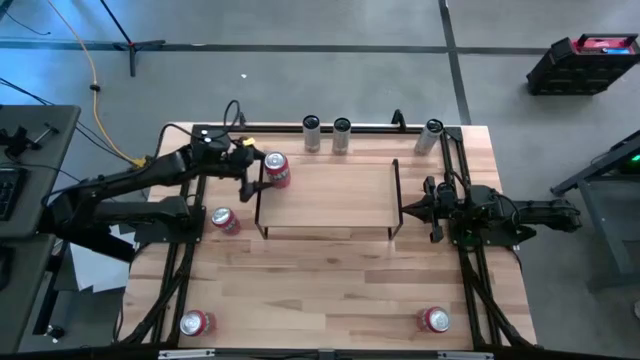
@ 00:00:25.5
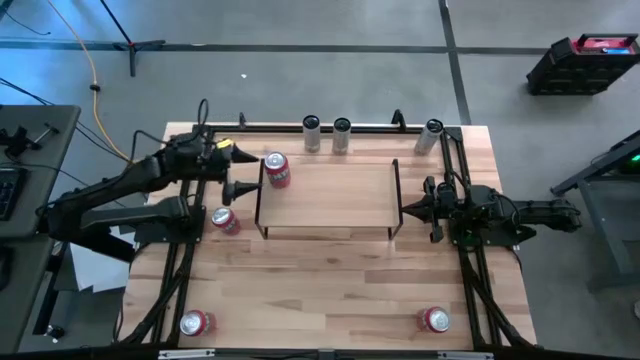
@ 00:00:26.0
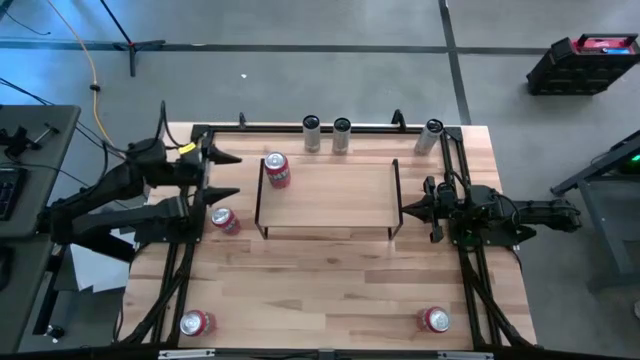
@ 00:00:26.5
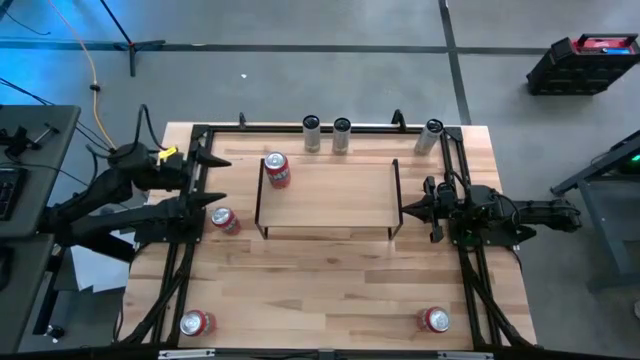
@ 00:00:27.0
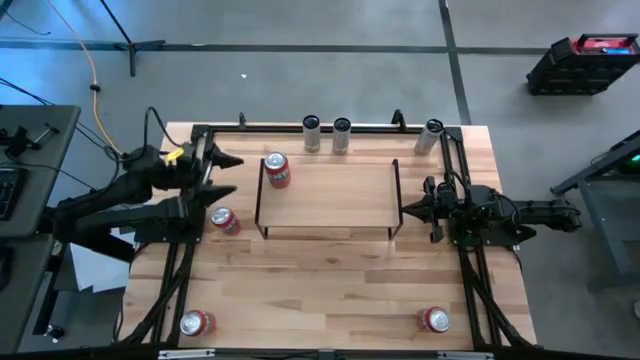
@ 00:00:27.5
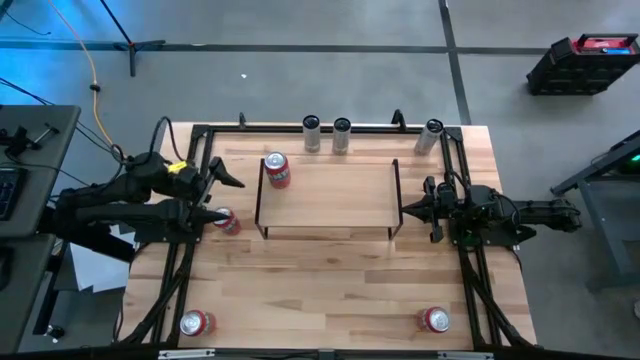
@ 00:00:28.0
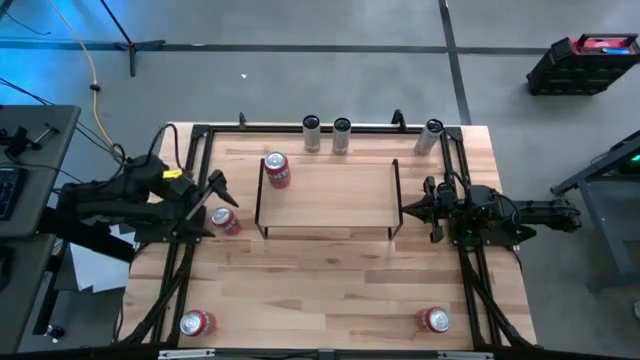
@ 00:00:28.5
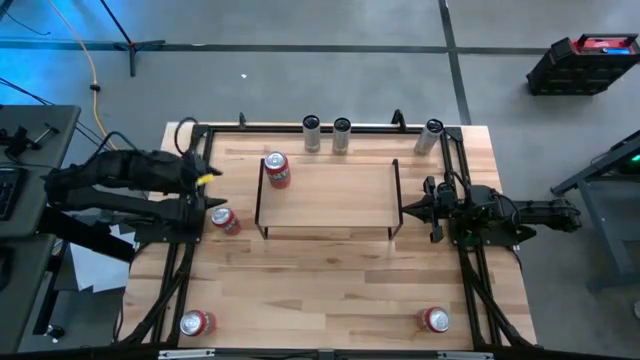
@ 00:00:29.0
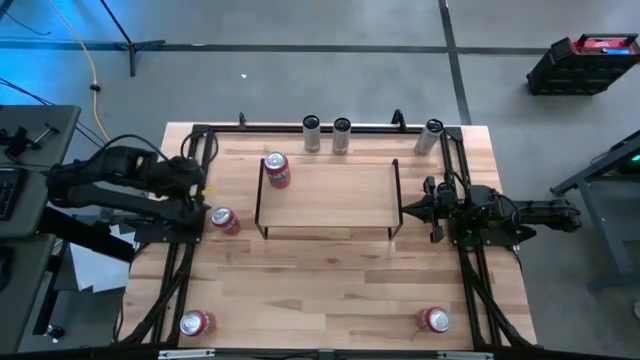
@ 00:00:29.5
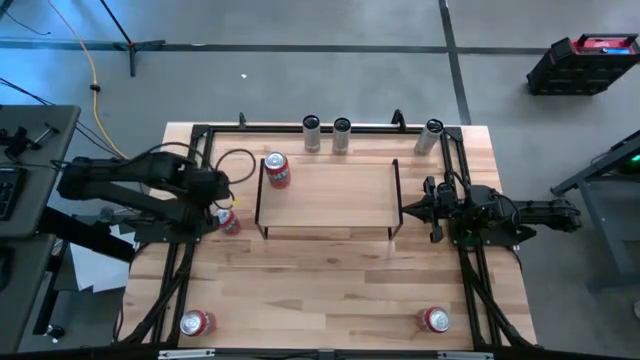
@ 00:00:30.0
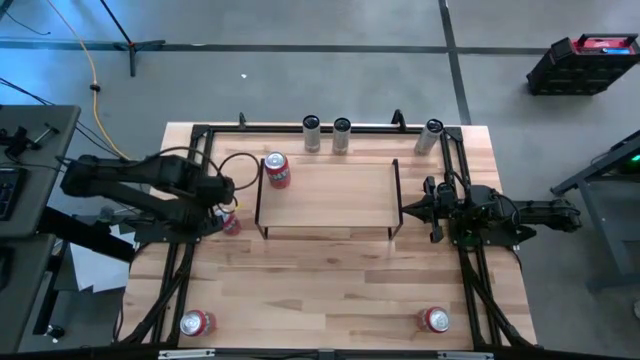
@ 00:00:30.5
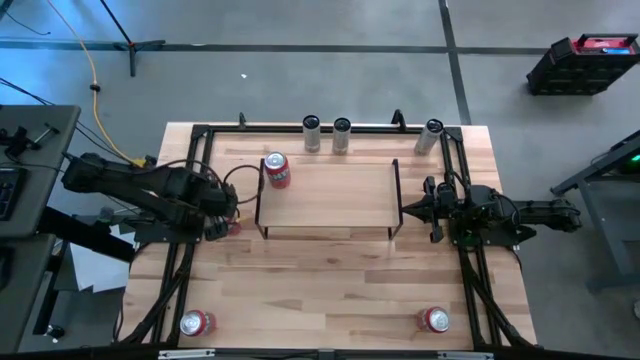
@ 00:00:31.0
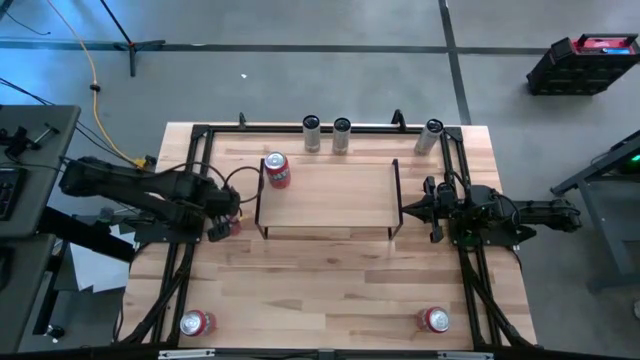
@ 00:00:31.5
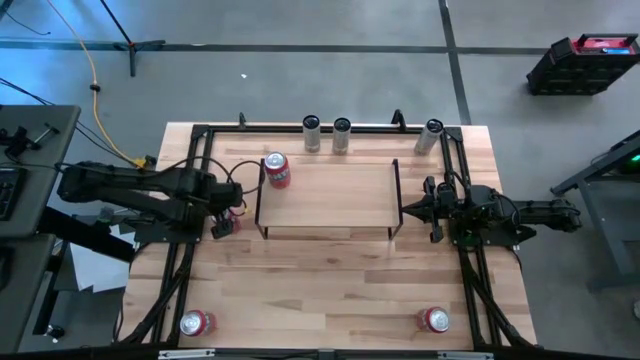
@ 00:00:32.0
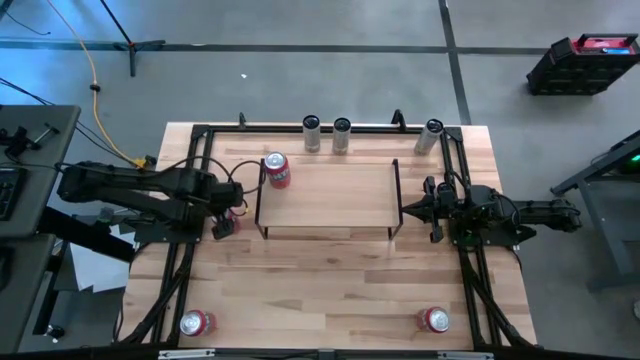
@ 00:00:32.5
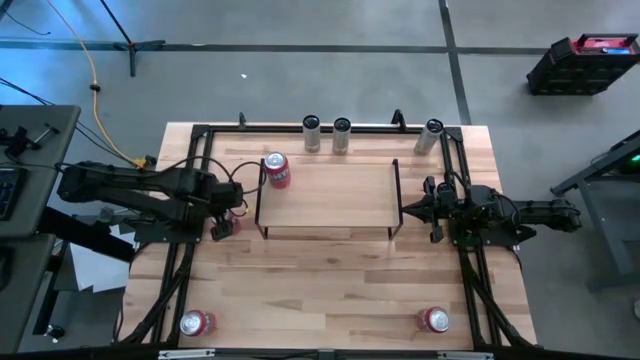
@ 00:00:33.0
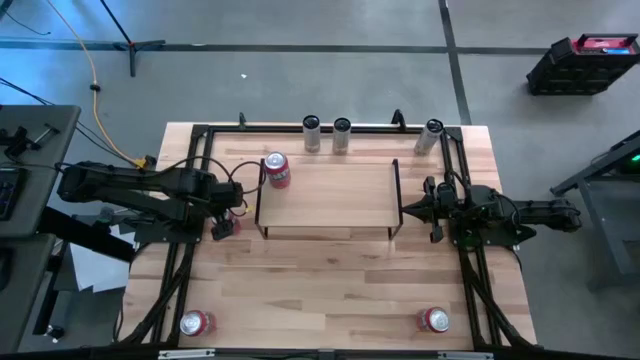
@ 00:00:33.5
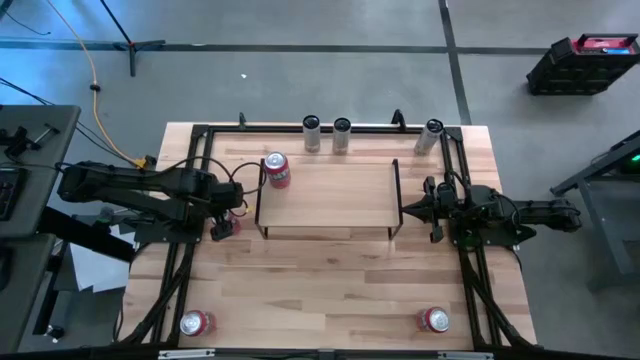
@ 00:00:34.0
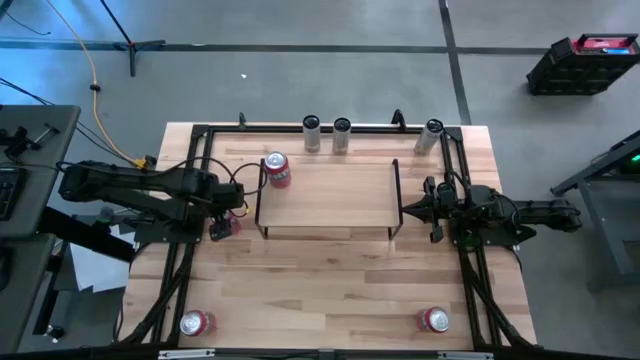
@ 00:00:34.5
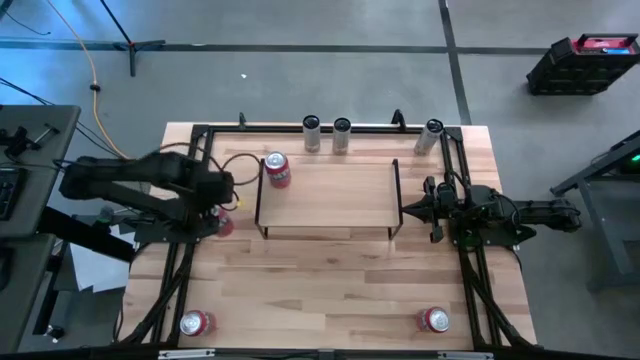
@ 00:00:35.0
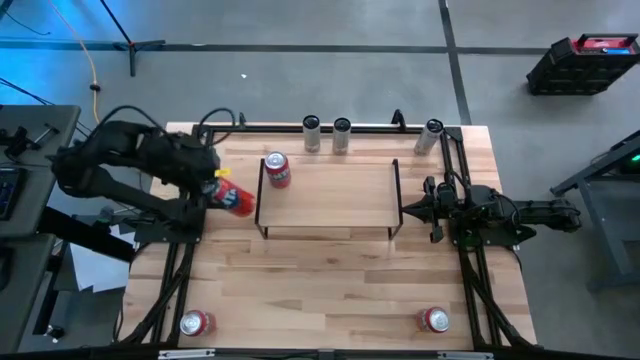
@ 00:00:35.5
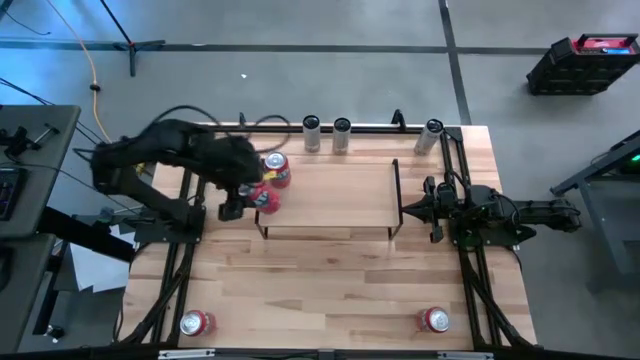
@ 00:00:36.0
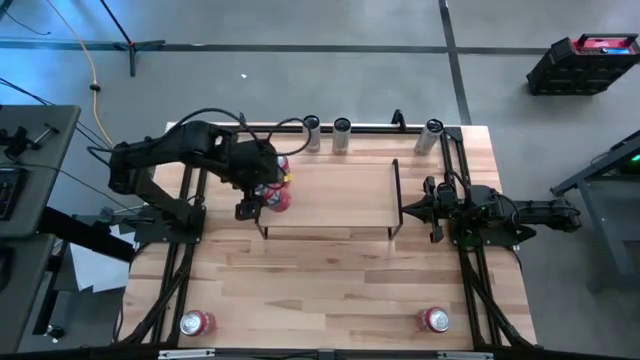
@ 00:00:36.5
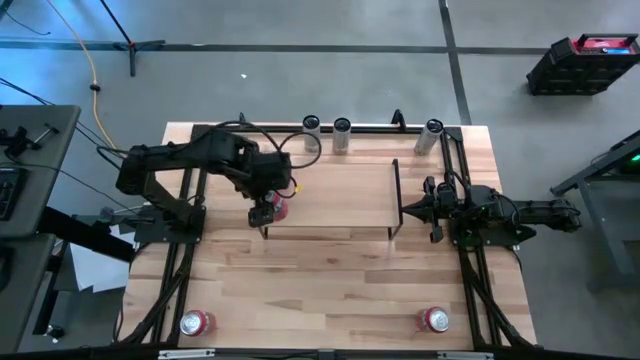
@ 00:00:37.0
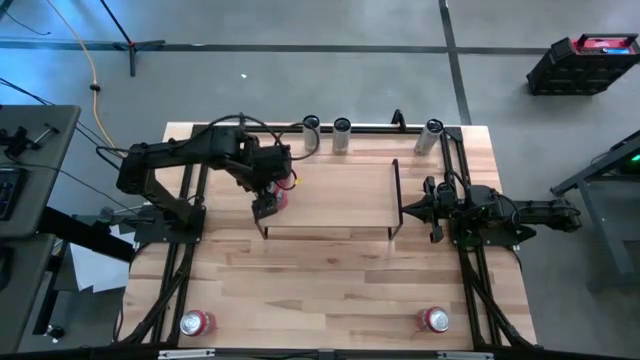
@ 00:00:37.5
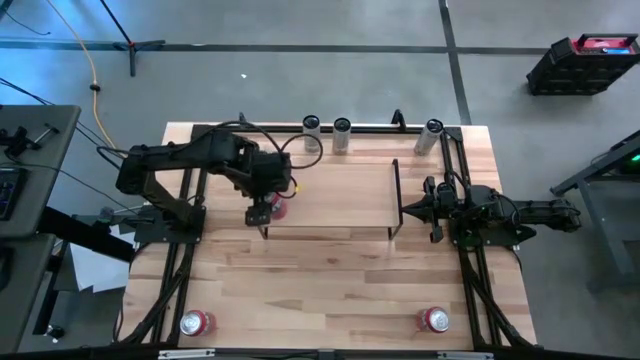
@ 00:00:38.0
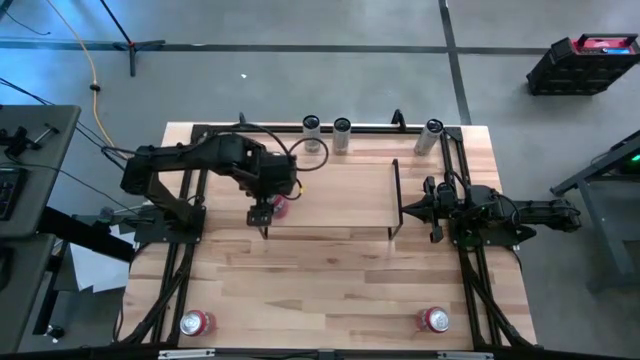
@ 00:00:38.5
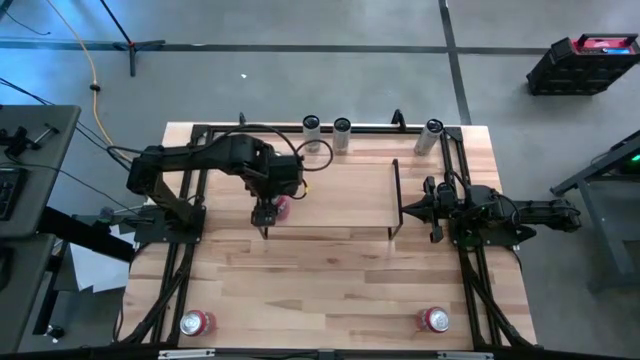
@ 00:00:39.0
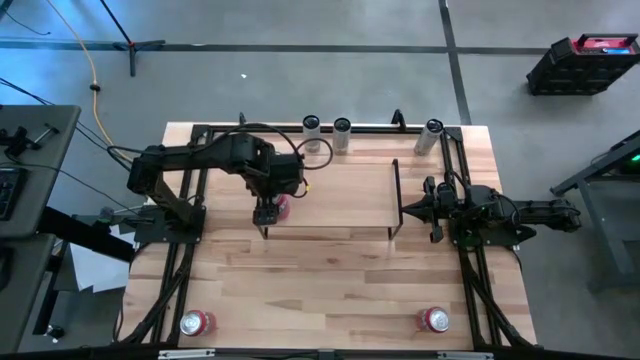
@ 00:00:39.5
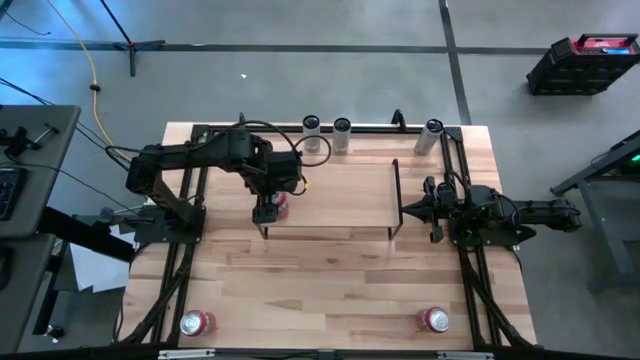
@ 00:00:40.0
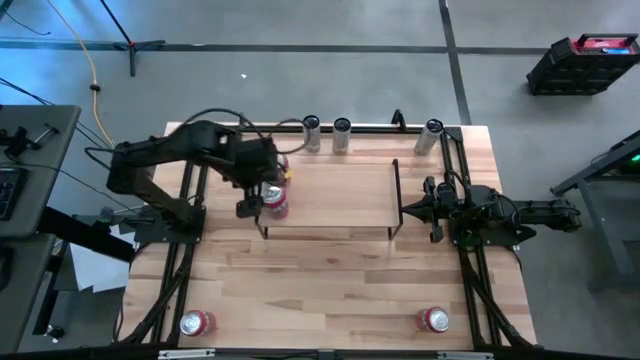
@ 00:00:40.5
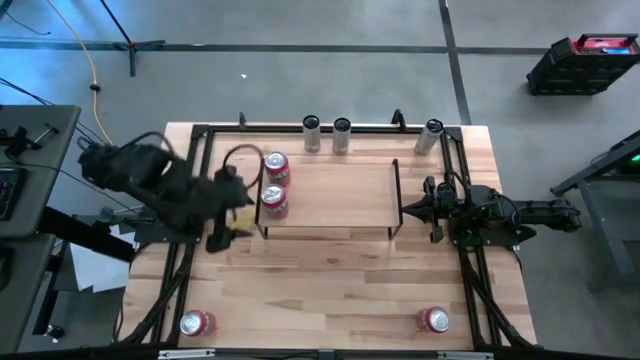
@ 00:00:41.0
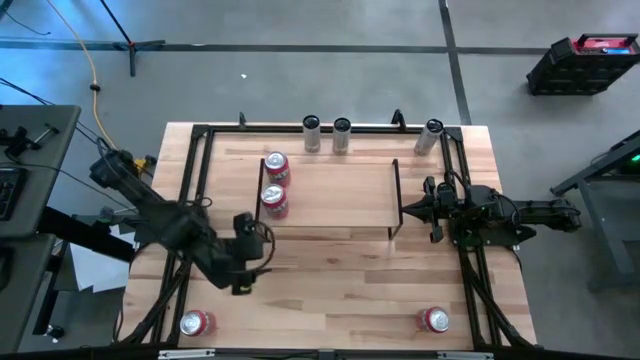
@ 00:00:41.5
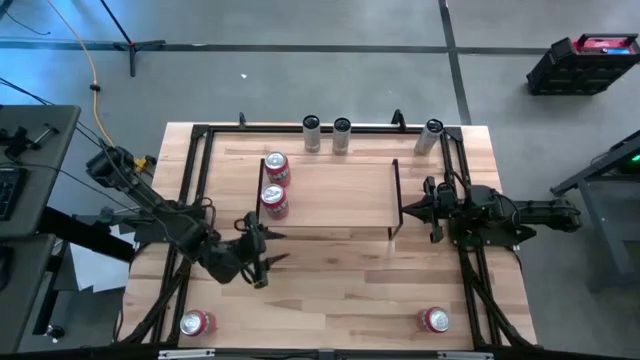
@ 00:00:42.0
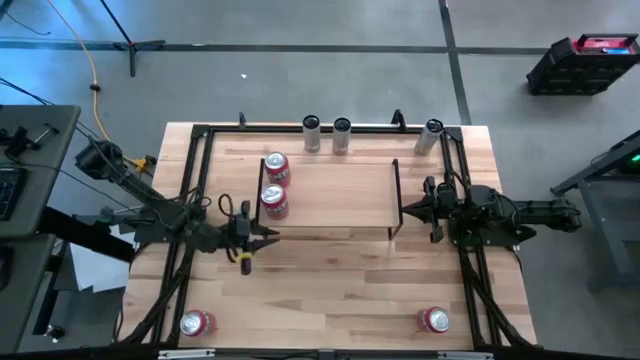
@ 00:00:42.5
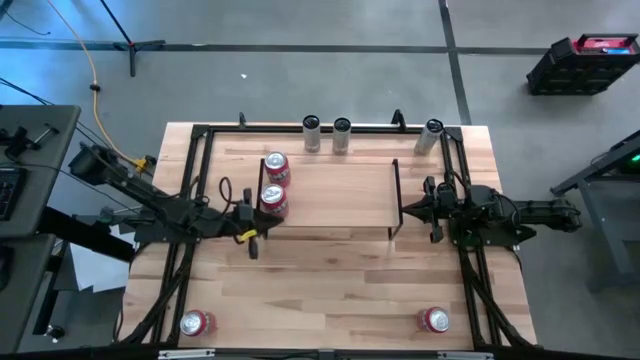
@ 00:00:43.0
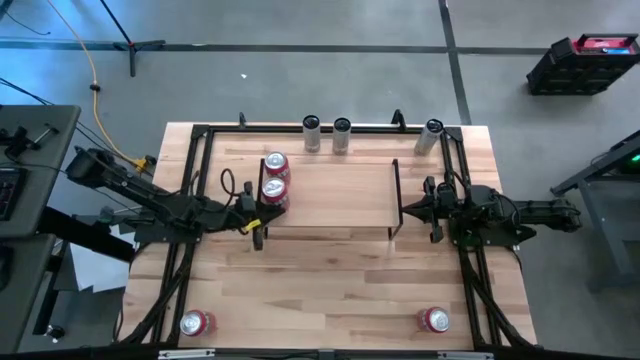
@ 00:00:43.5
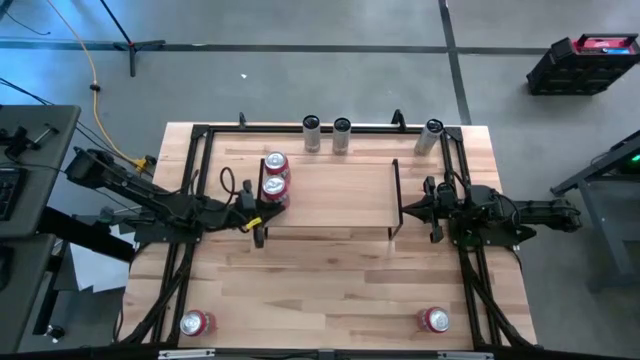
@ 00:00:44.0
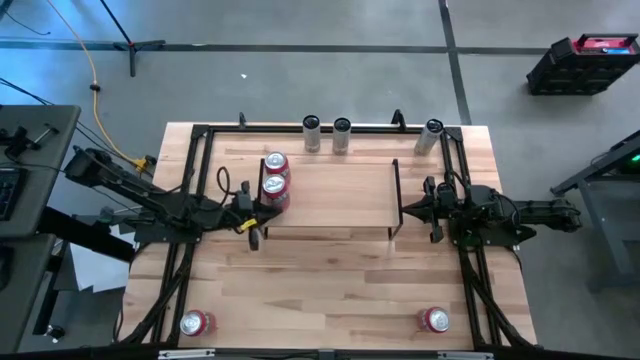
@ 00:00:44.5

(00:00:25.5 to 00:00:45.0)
Task: Place canned beverage on shelf
Put the red soda can on the shelf aligned with the other red soda can

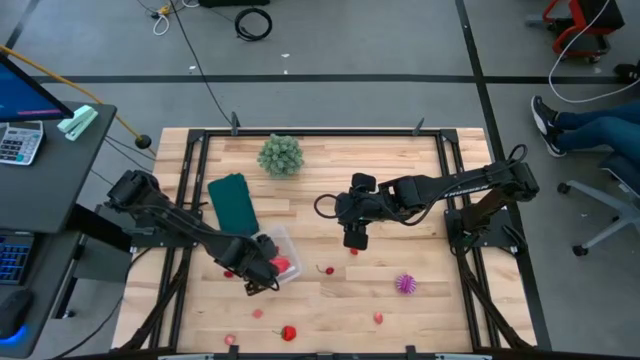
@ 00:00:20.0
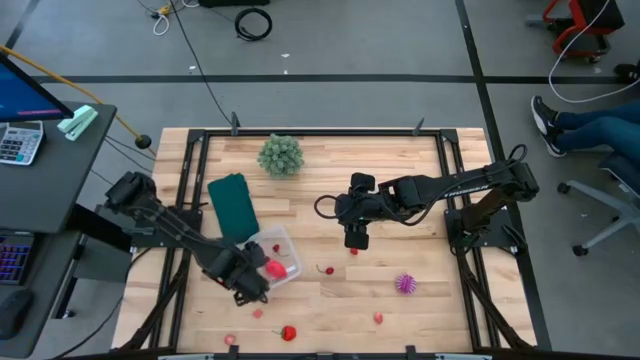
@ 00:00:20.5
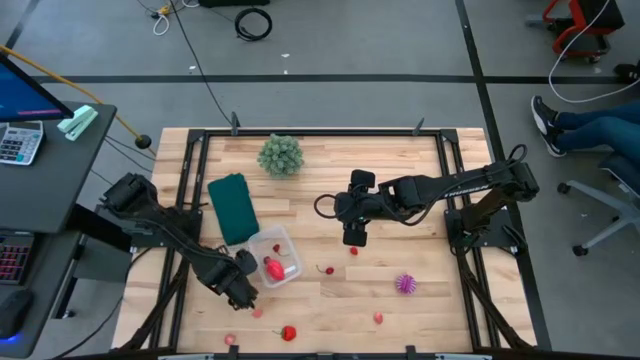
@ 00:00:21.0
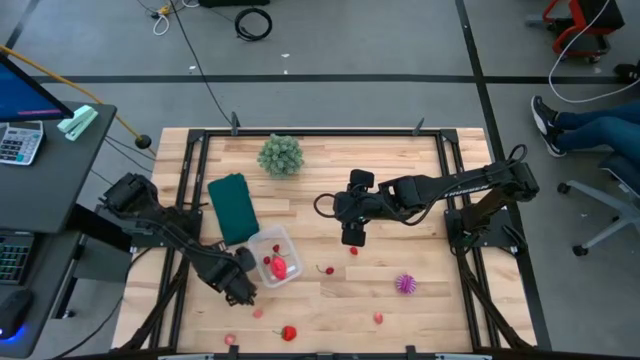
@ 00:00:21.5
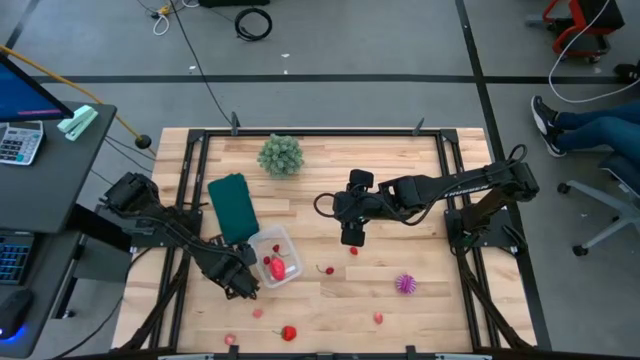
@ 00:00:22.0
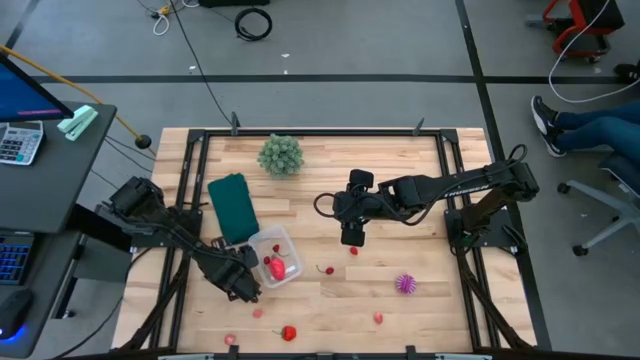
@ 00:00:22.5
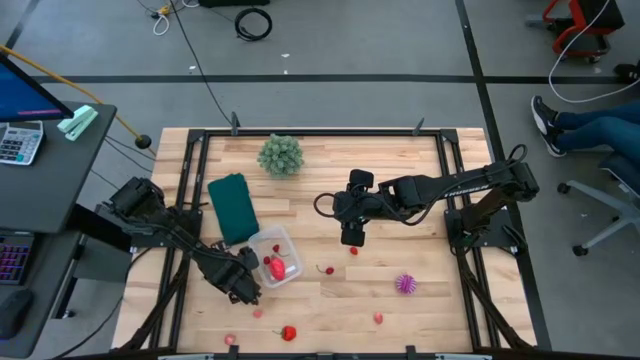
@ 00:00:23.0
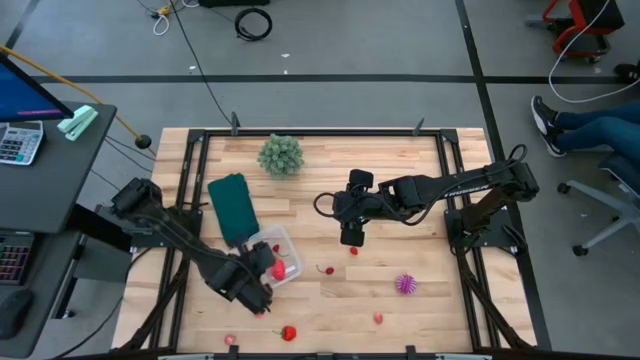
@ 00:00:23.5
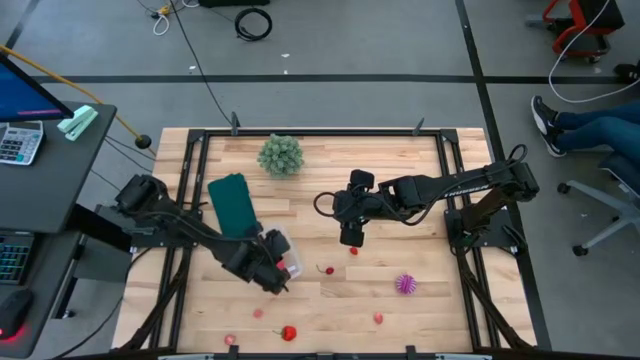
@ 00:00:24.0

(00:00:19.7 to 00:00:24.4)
Task: Pick and placing Produce into tupperware
Put the red cherry into the transparent bin
